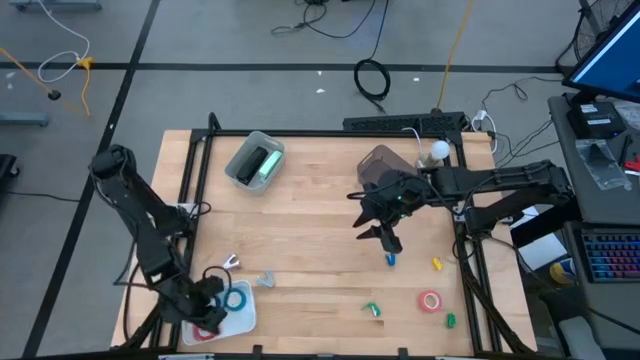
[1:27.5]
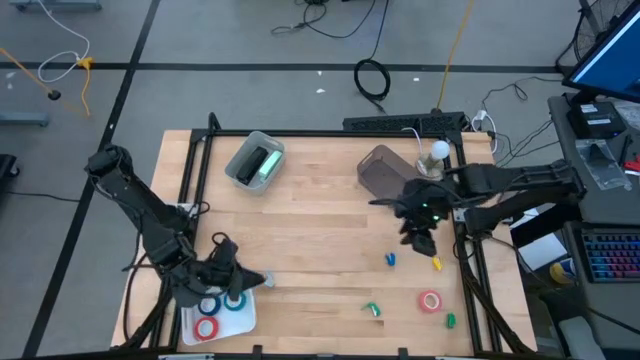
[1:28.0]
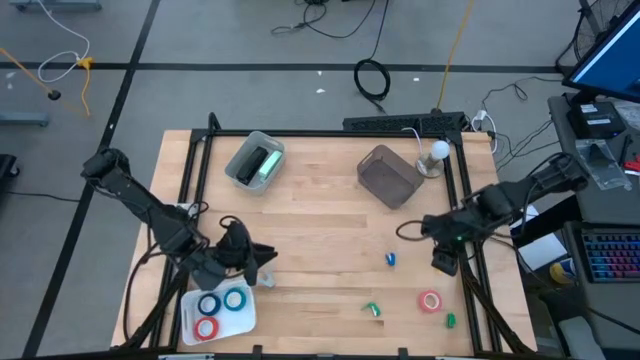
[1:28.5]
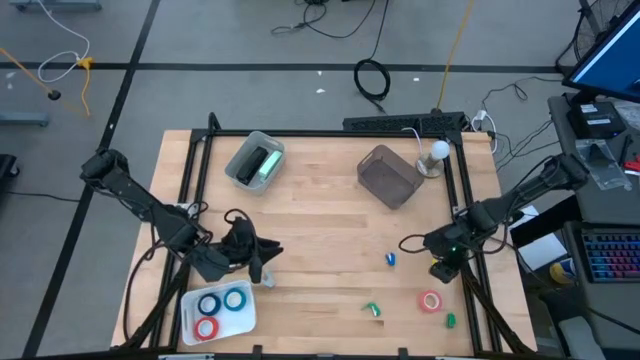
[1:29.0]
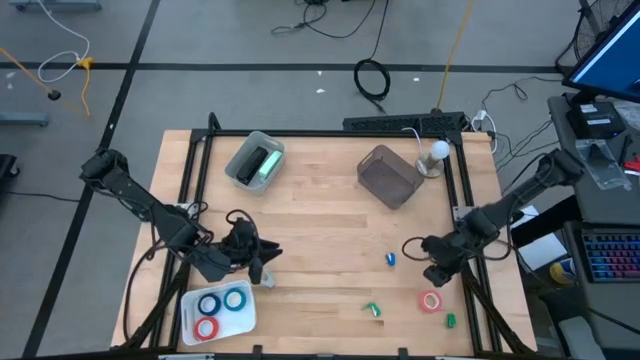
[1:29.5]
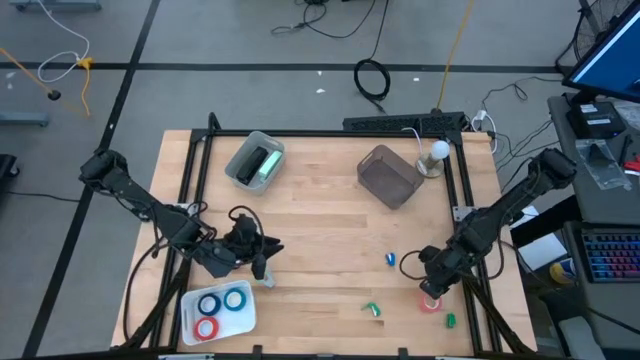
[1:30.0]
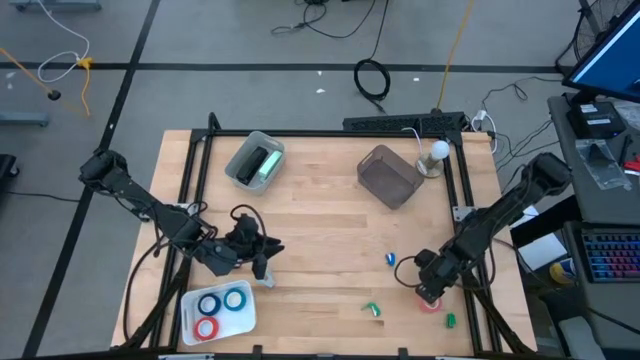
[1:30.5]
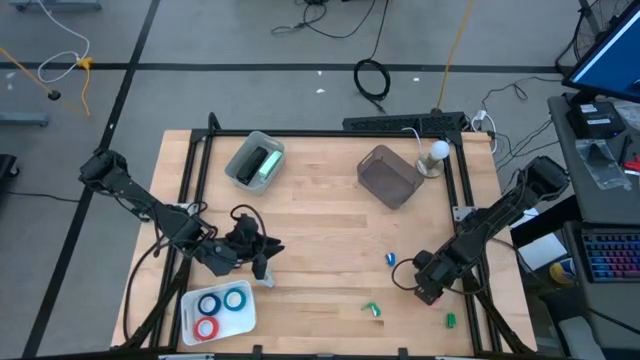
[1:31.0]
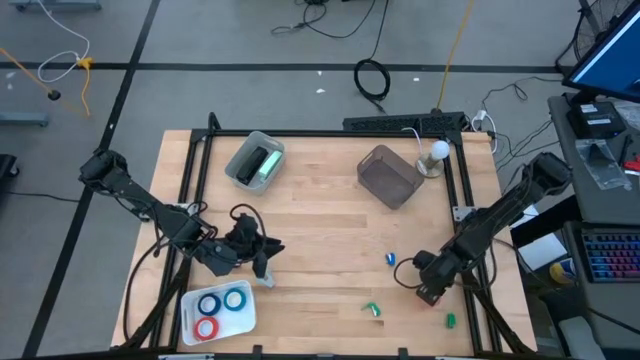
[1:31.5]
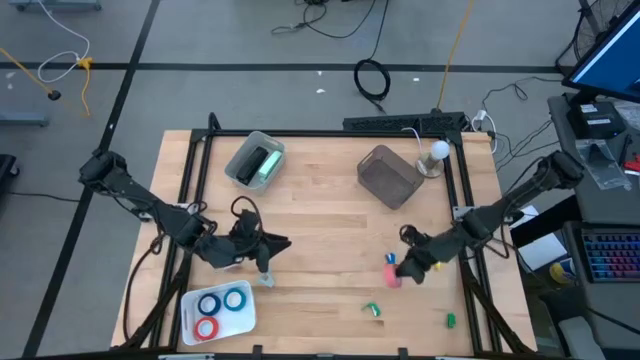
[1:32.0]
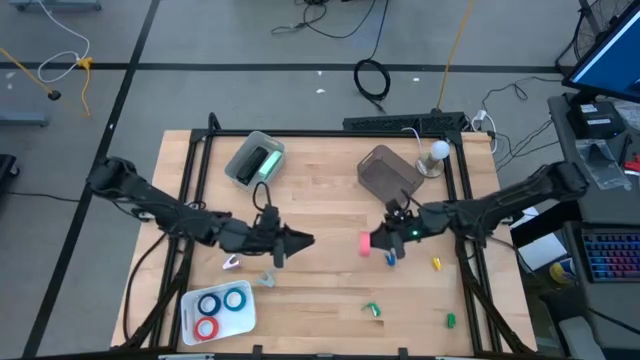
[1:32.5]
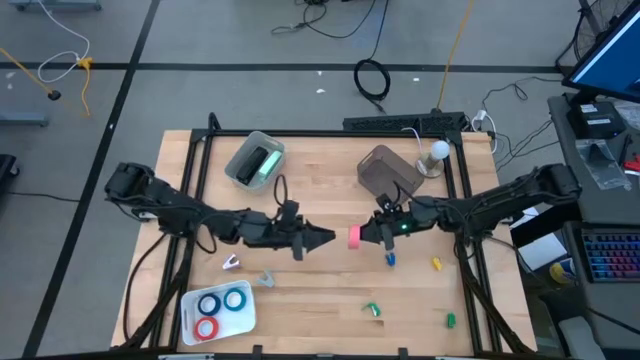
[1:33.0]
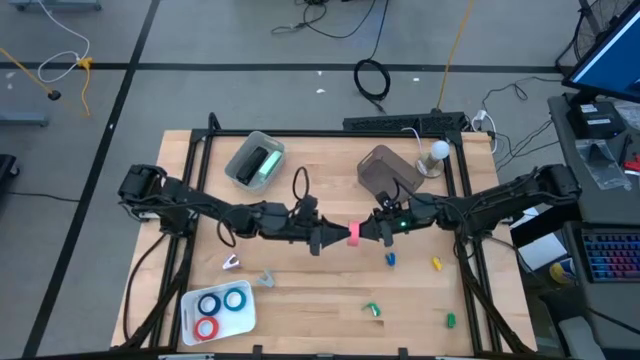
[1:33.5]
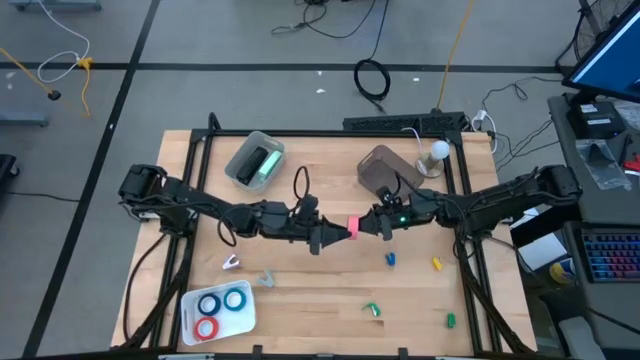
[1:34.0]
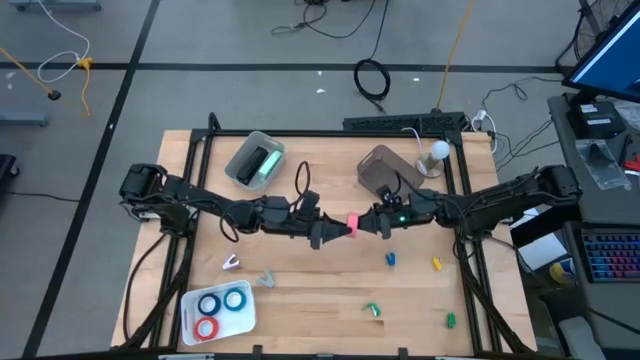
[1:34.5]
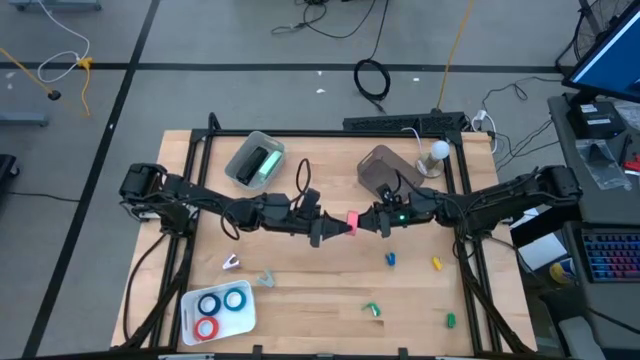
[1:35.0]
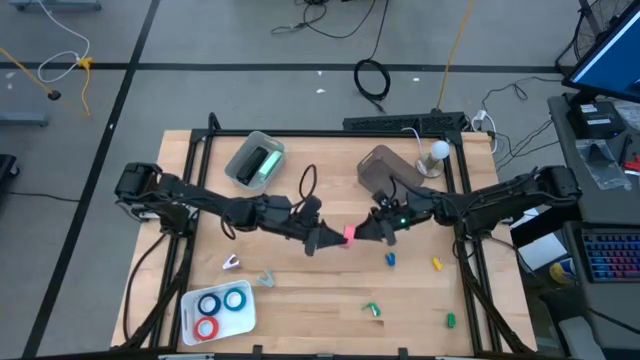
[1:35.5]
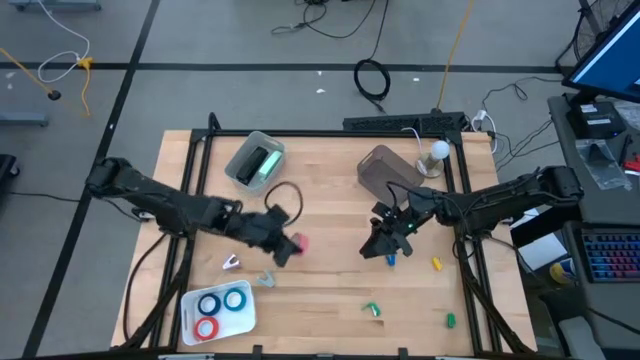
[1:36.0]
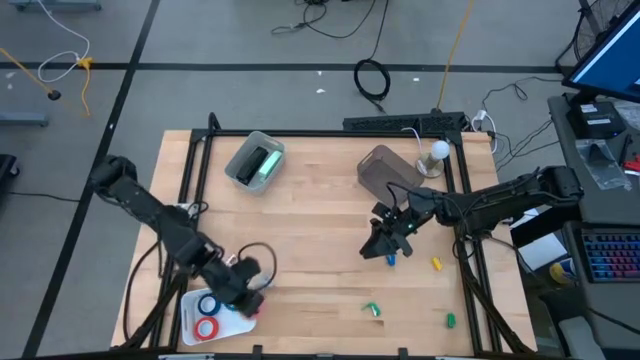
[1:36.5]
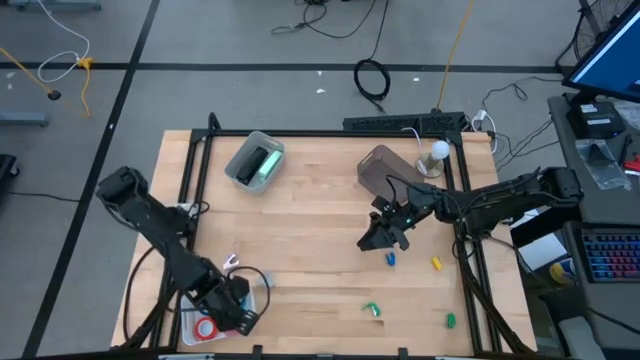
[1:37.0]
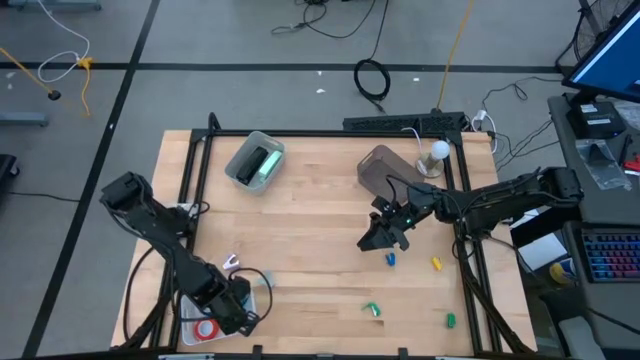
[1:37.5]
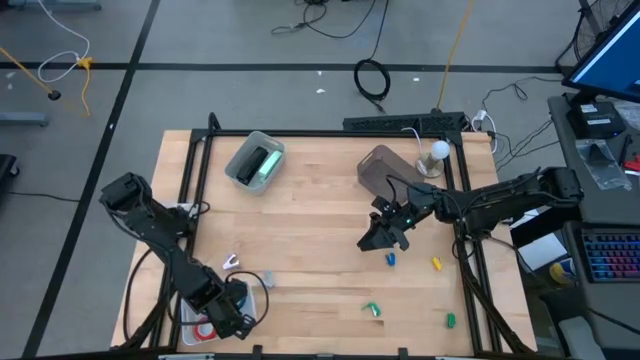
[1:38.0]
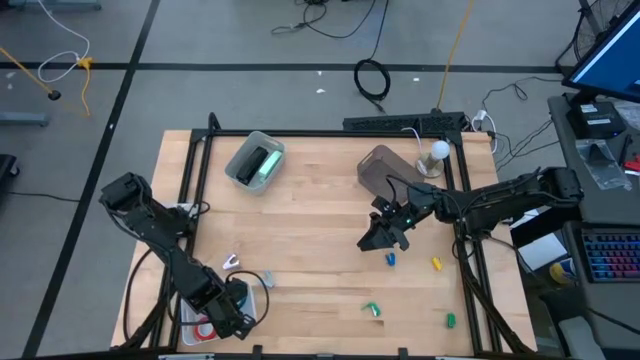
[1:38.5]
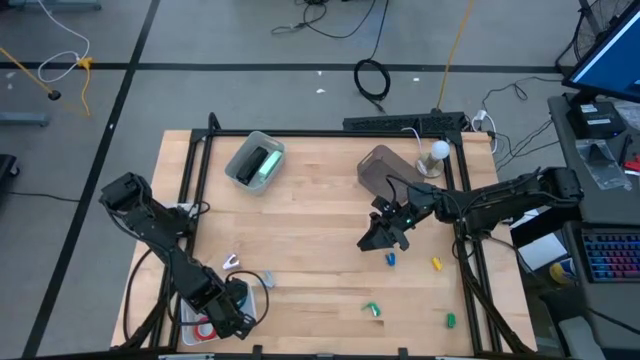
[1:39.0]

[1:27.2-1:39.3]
Task: Pick and place Stapler, Stapler remover, tape
Put the pink tape into the white bin

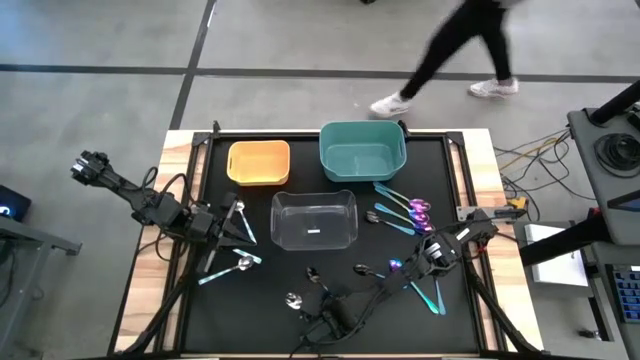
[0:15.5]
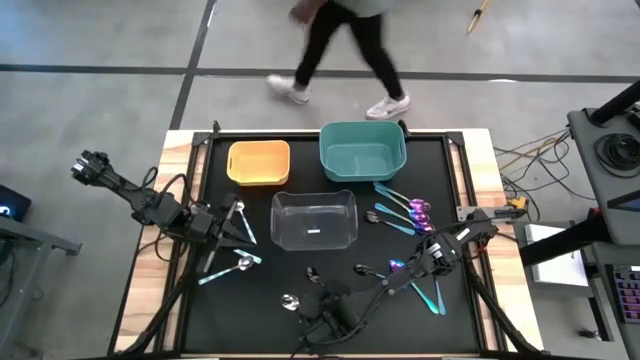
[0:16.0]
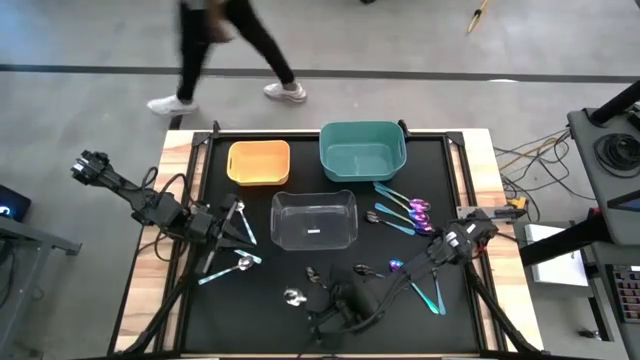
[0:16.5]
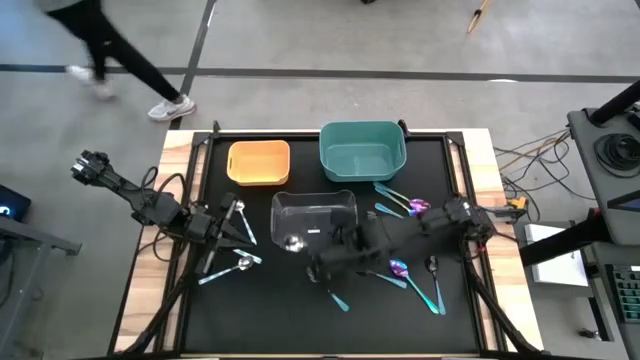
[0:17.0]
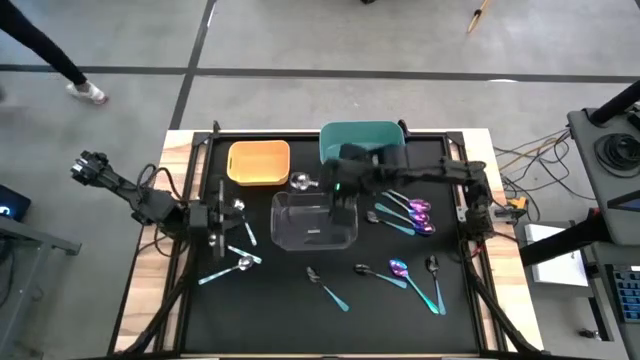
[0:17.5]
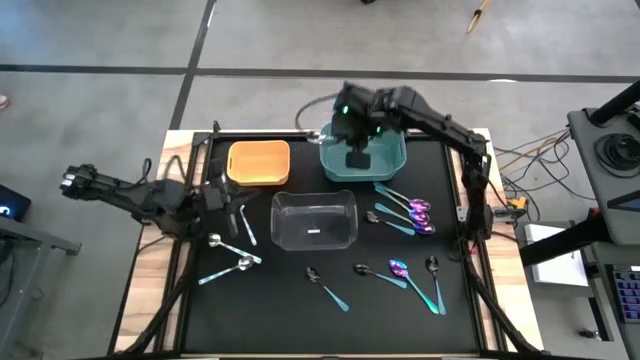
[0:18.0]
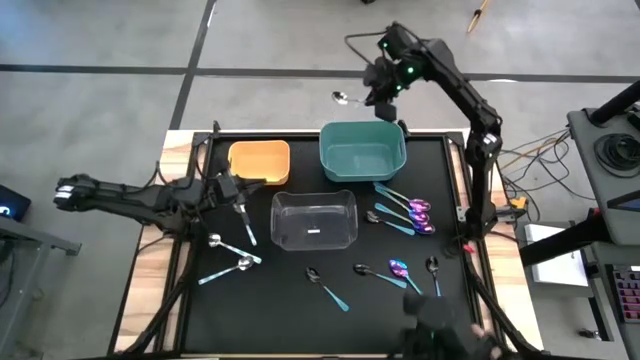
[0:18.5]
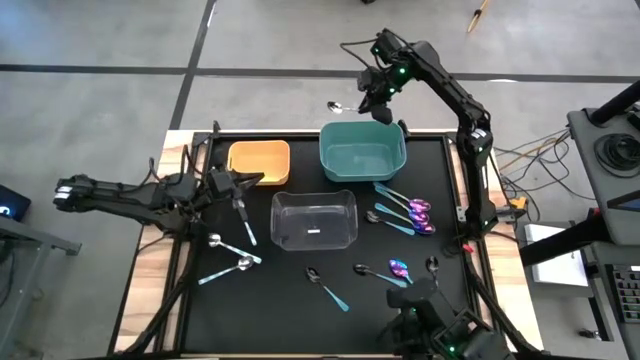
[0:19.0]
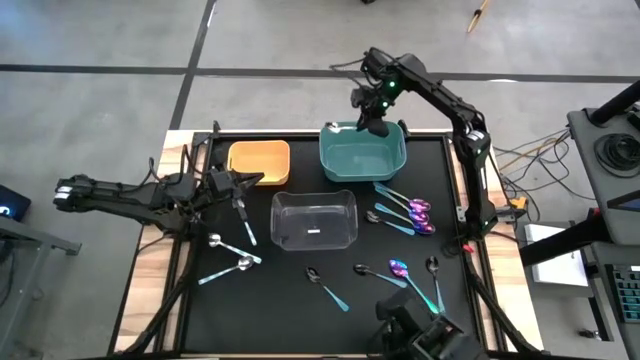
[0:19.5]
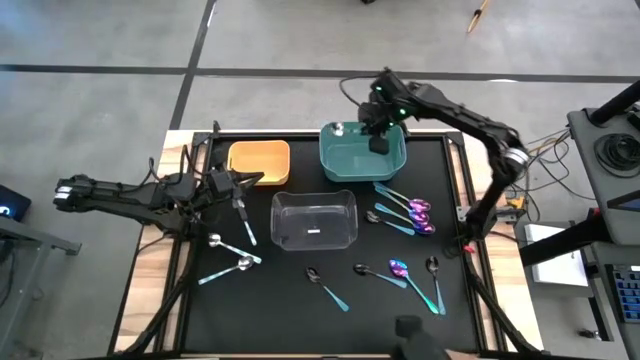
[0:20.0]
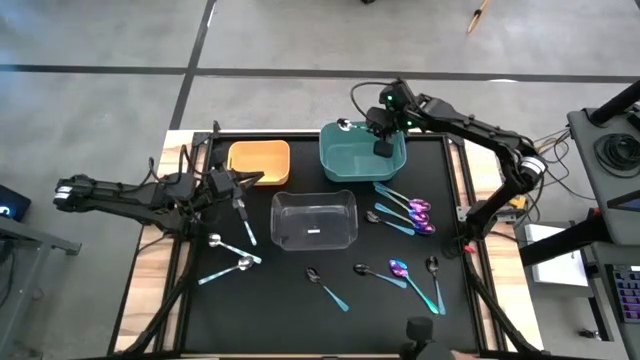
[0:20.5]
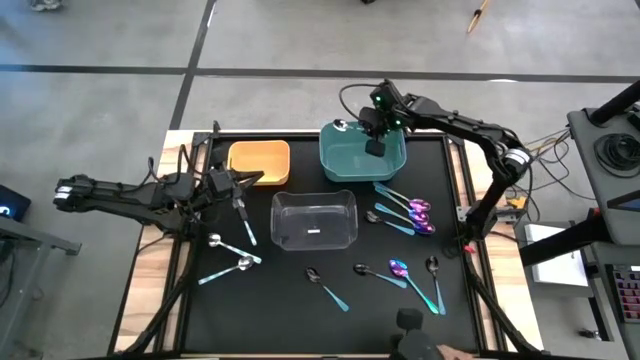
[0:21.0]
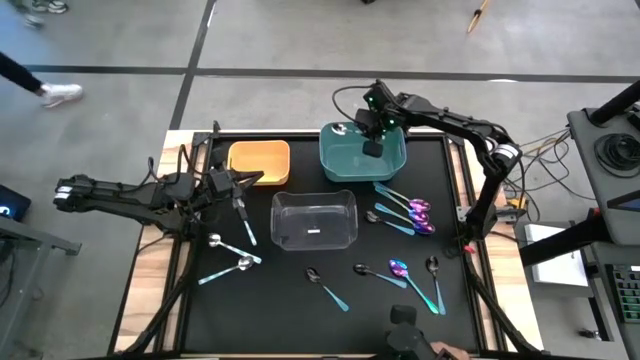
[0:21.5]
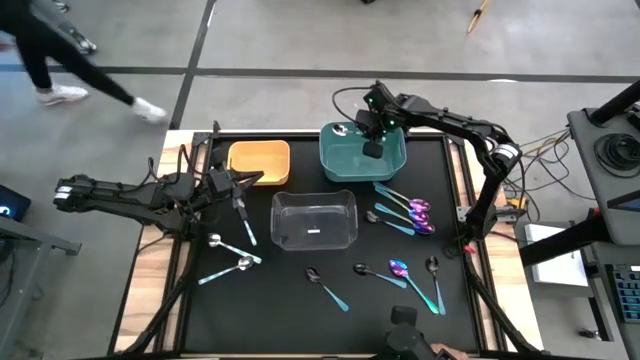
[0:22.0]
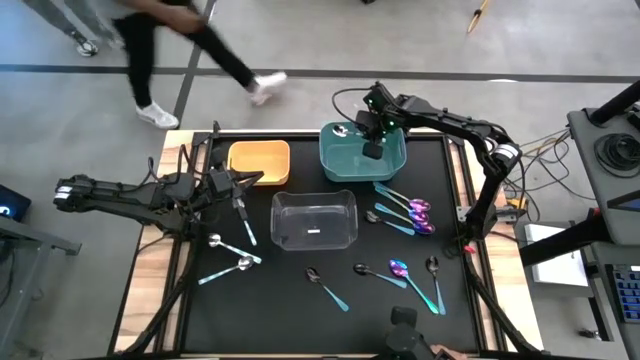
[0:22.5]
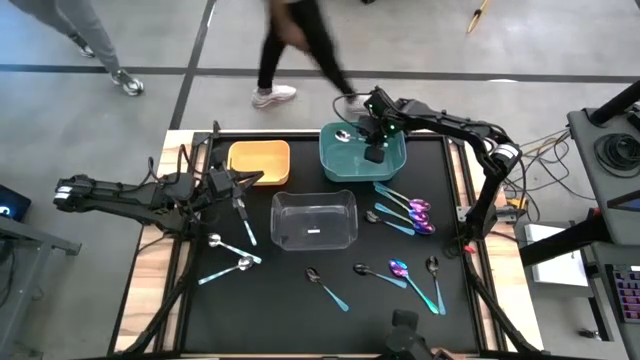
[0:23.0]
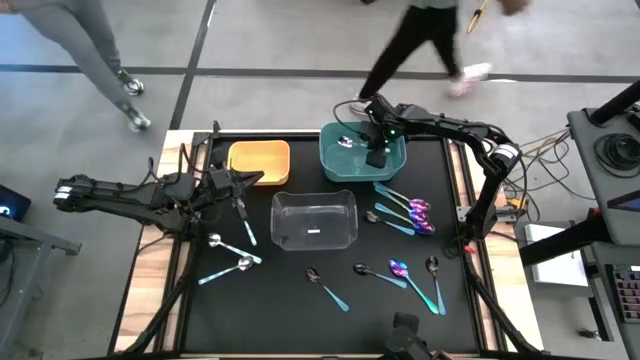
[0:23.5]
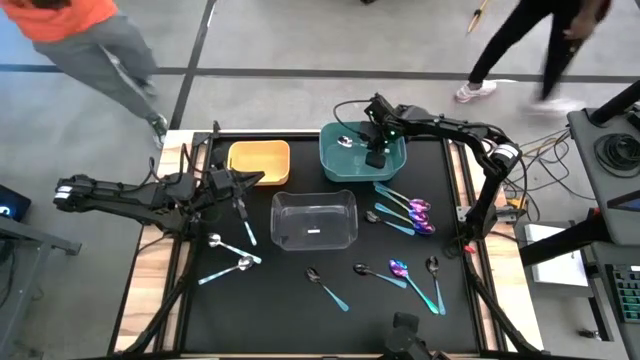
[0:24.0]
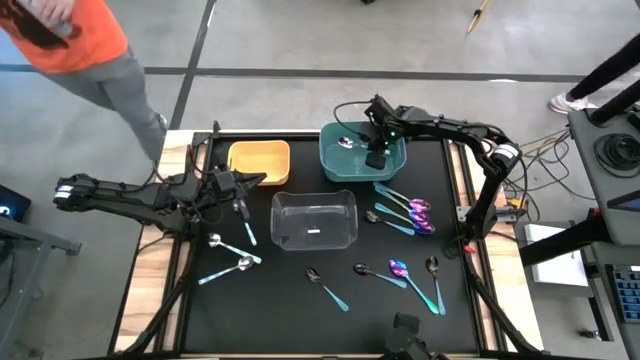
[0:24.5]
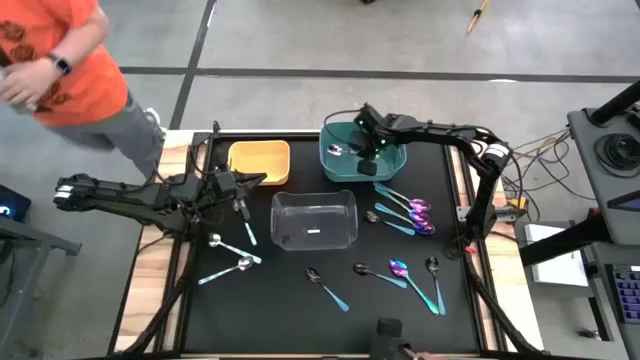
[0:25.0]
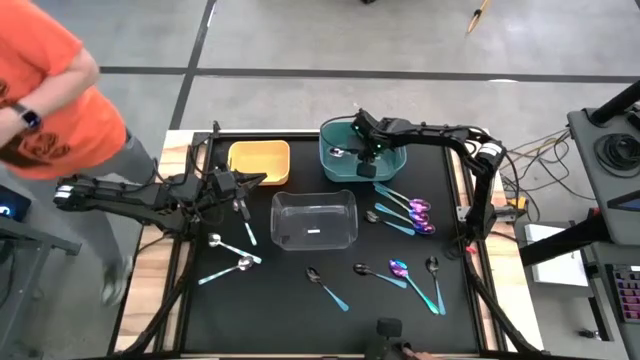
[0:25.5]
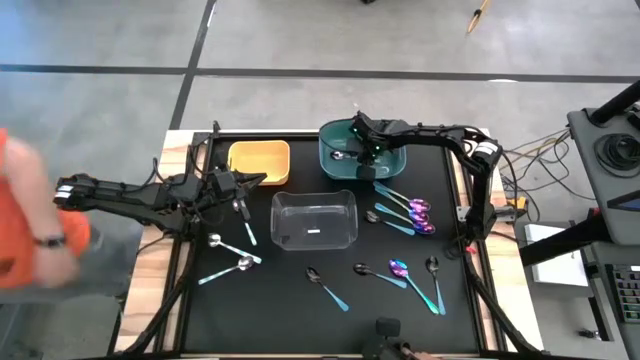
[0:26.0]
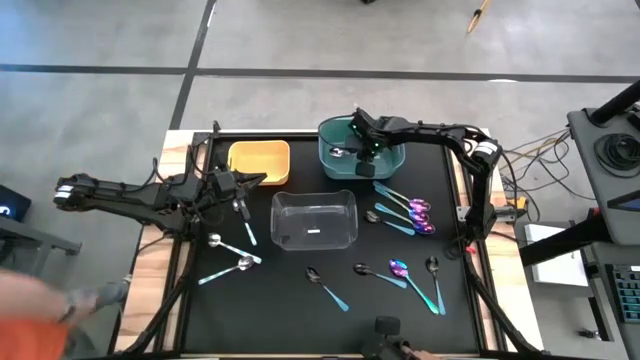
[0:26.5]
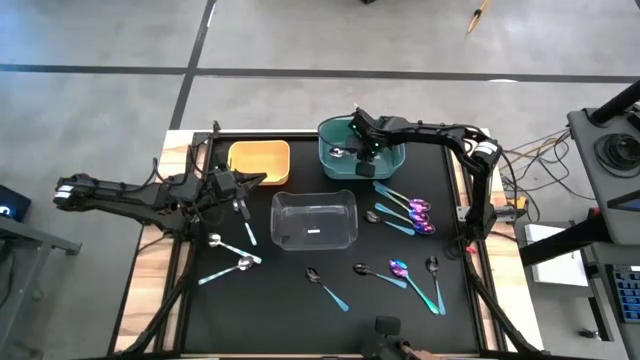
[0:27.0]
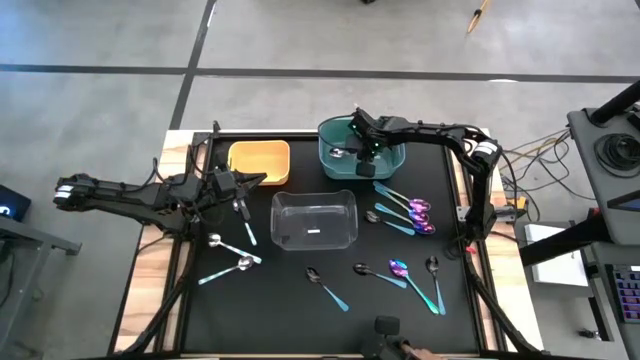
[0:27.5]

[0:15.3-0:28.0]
Task: Sort silverware by color (type)
Put the blue patterned spoon into the green bin
